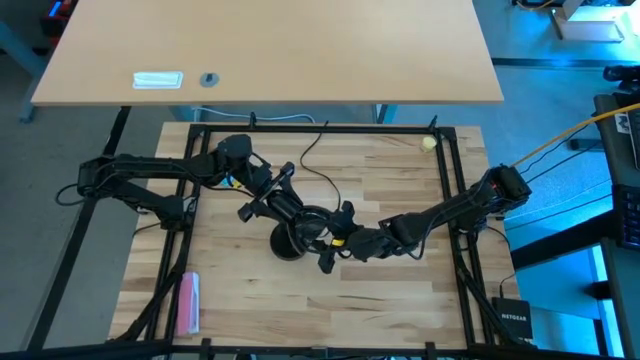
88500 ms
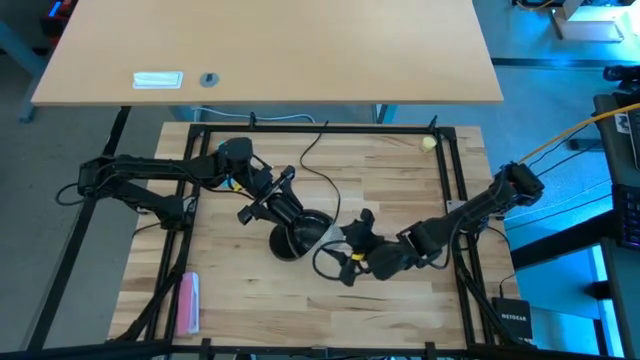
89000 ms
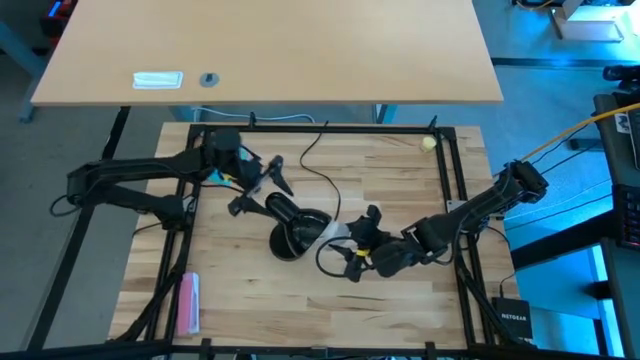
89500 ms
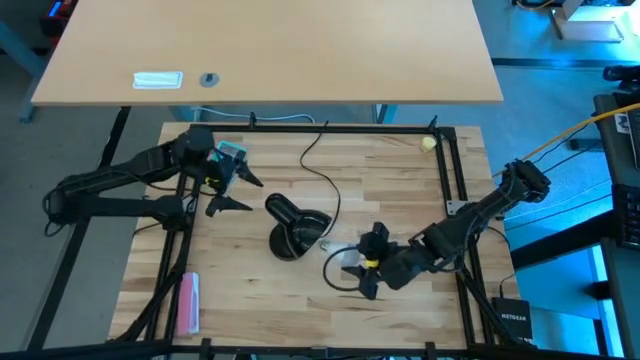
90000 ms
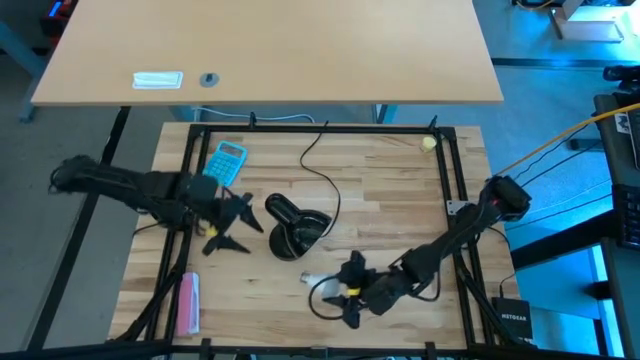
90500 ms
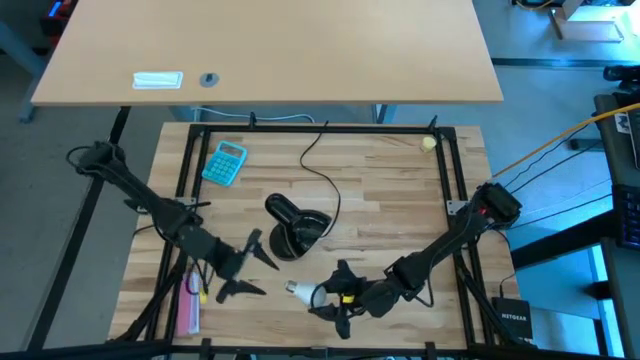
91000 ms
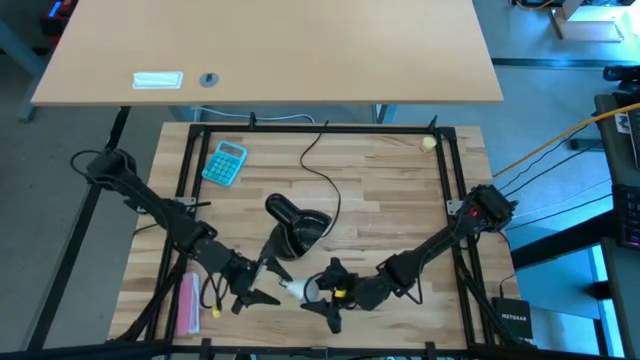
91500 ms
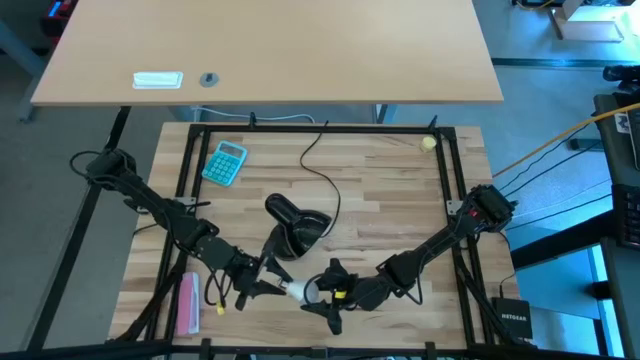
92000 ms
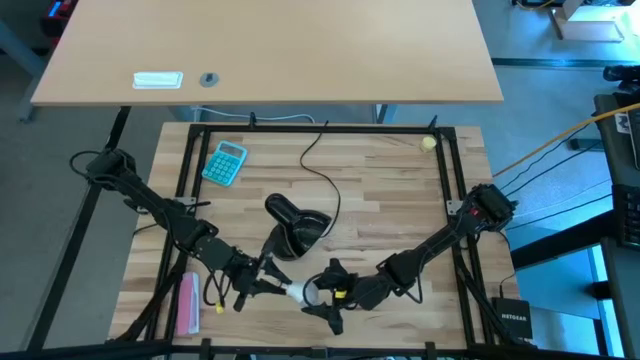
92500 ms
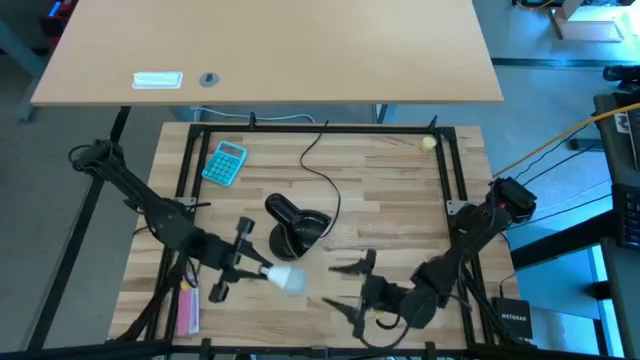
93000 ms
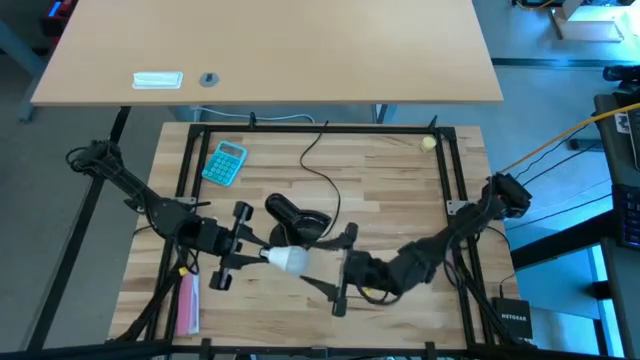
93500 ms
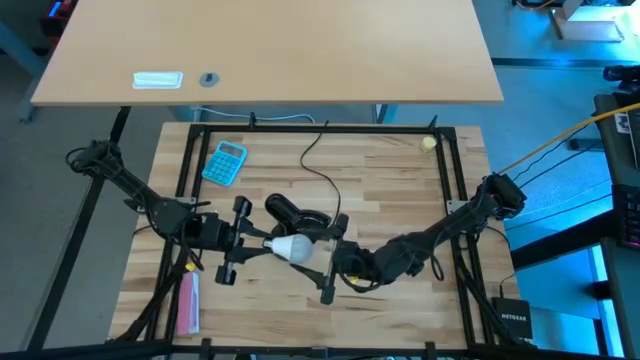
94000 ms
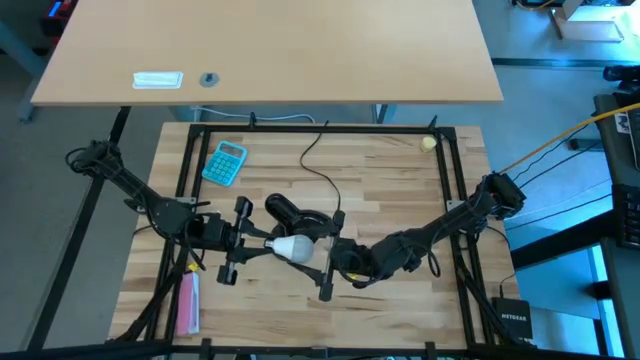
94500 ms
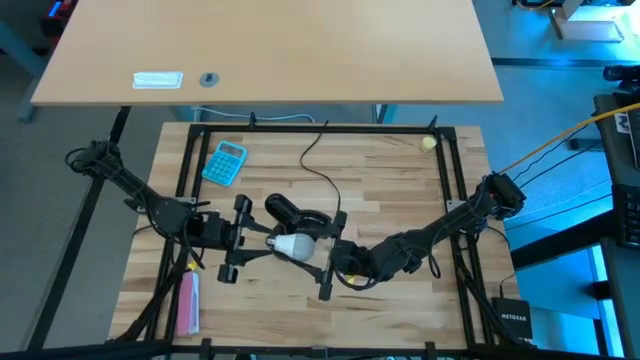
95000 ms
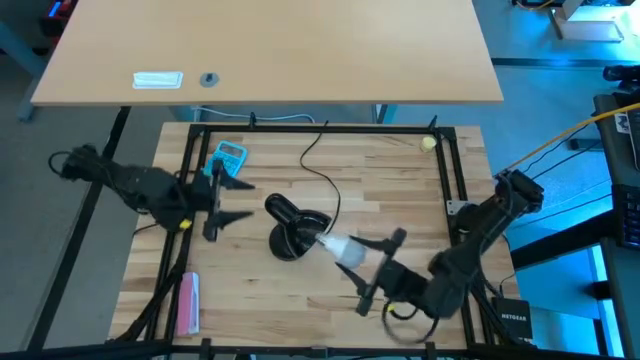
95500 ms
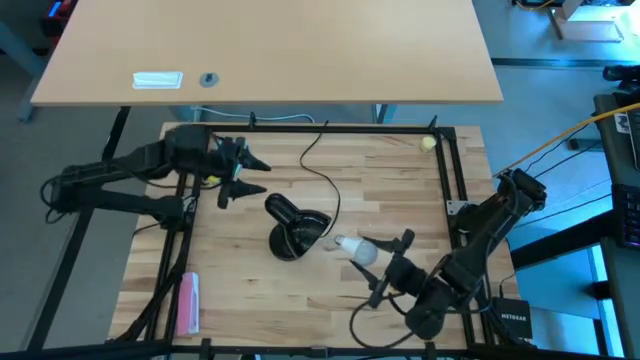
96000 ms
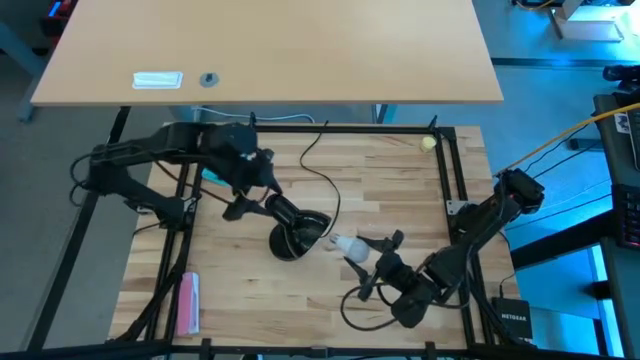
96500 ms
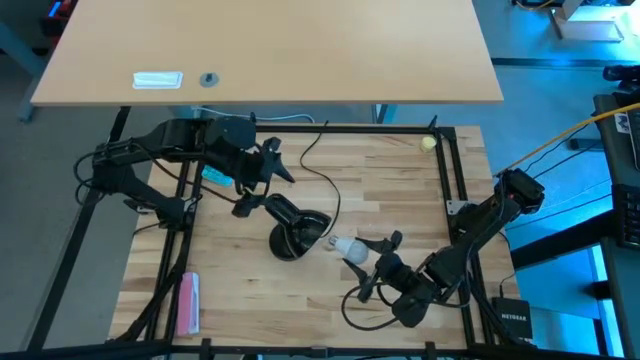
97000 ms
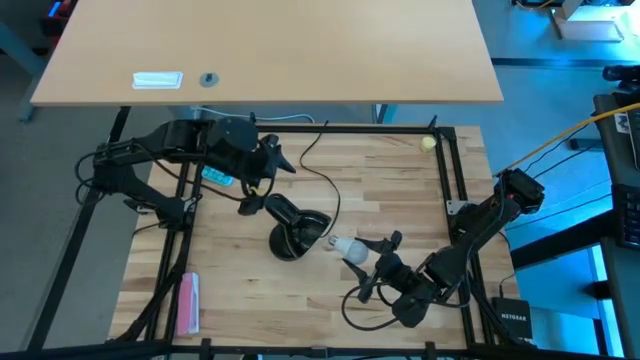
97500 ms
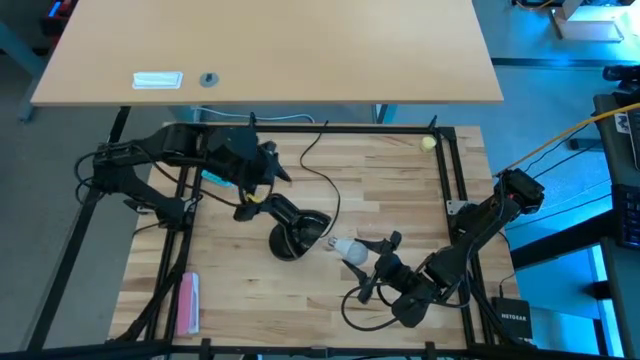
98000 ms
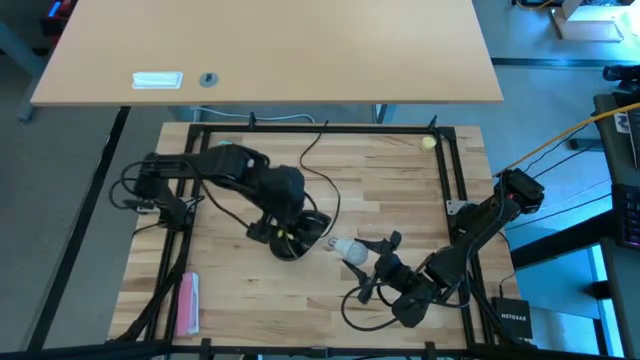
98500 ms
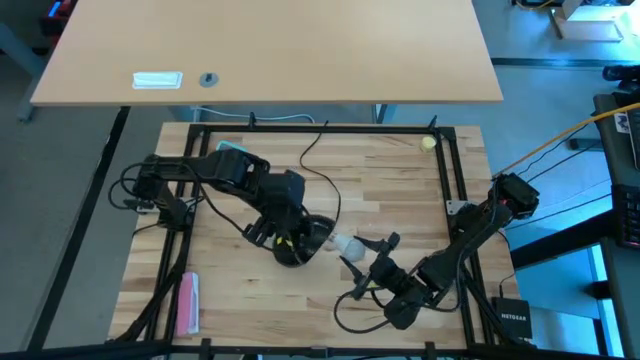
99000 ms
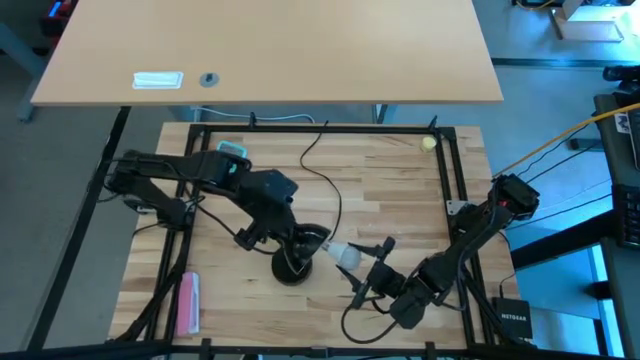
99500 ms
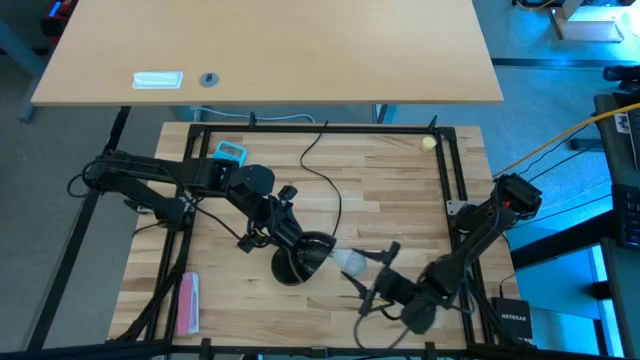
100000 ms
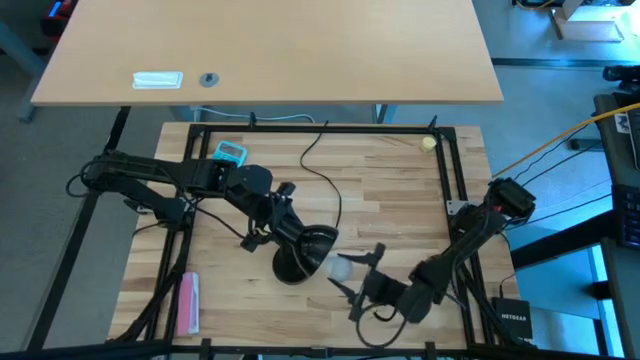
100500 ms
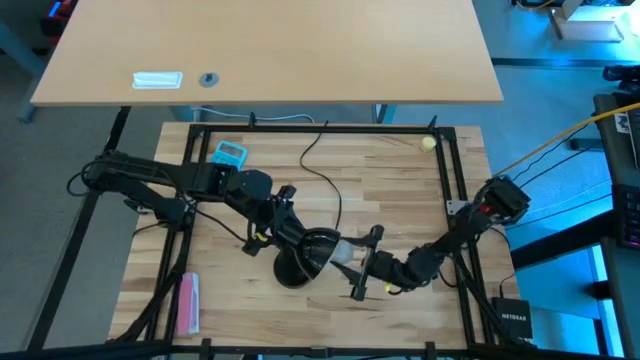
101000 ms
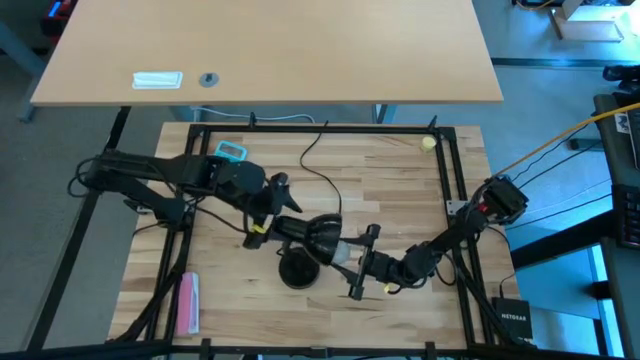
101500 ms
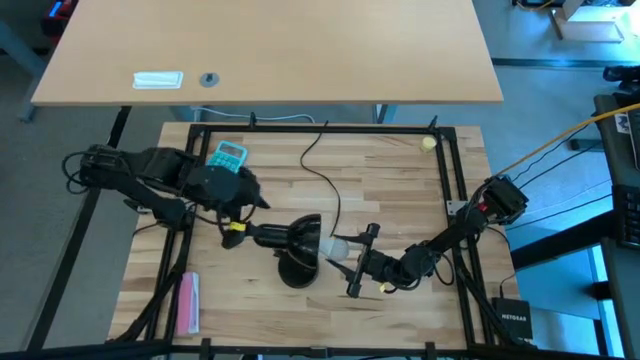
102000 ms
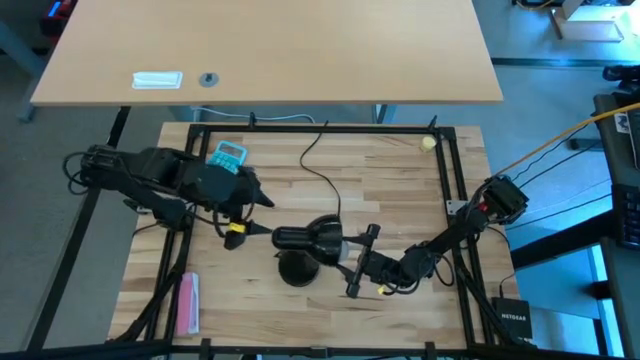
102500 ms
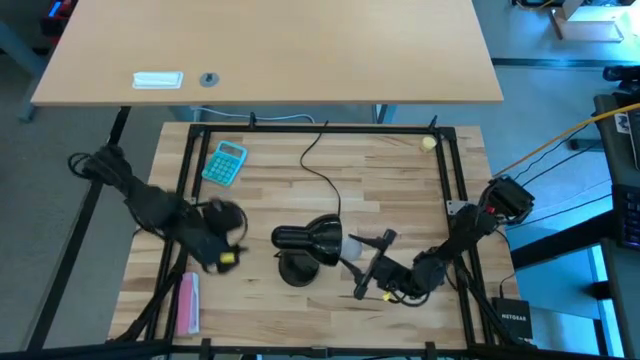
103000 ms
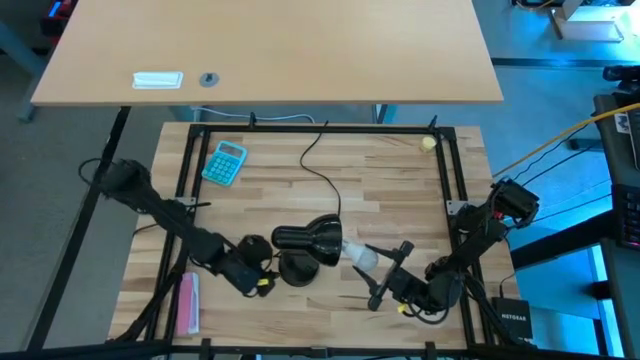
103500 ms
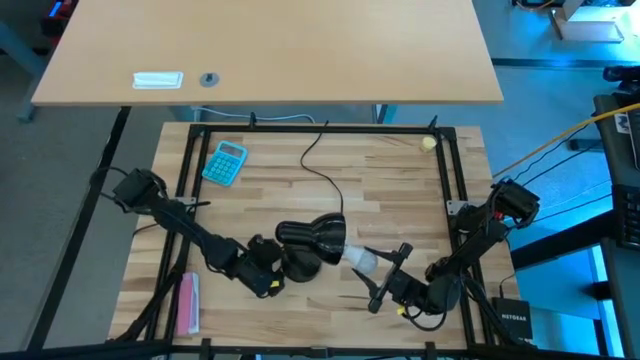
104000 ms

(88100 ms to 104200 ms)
Task: Screw lightbulb
Insert the lightbulb into the black lamp

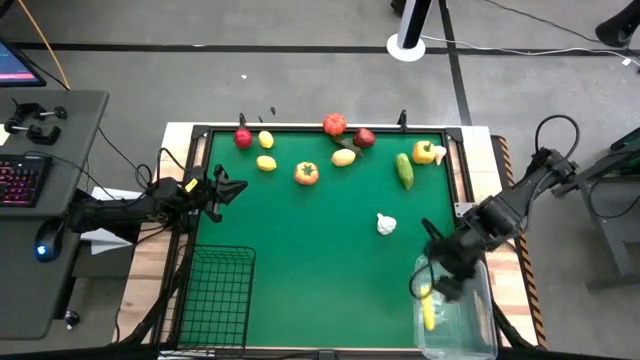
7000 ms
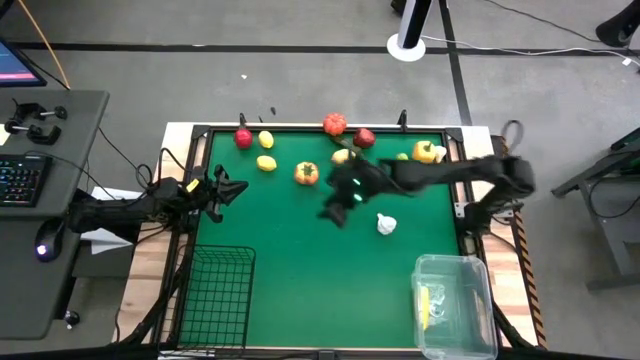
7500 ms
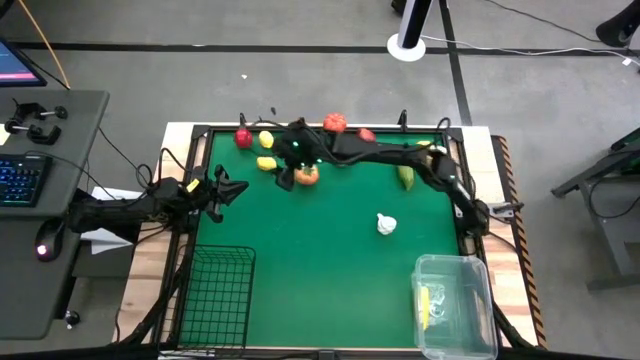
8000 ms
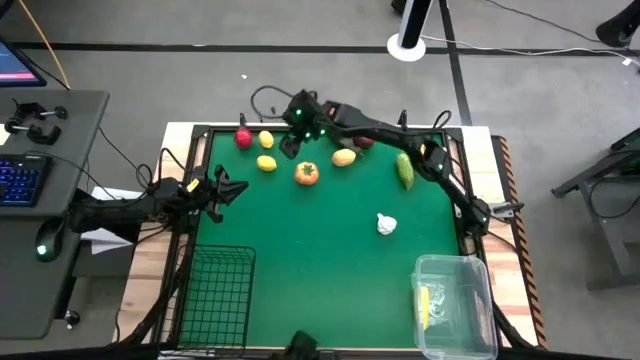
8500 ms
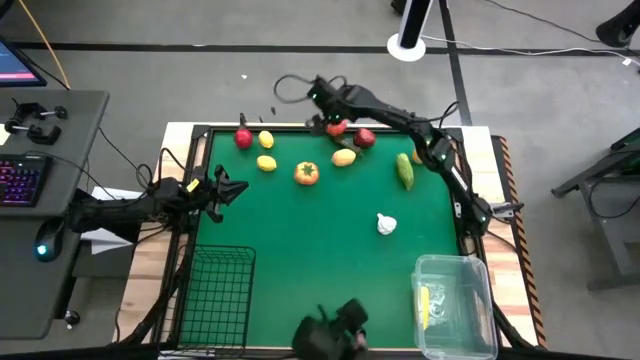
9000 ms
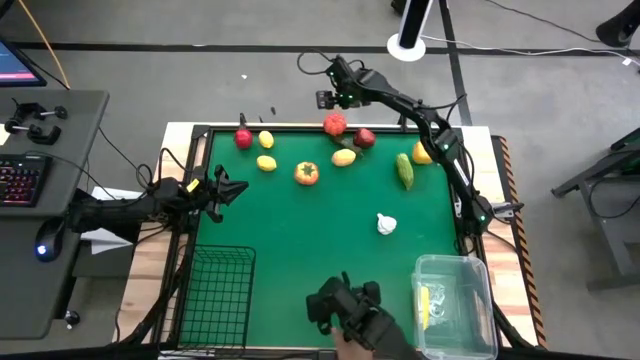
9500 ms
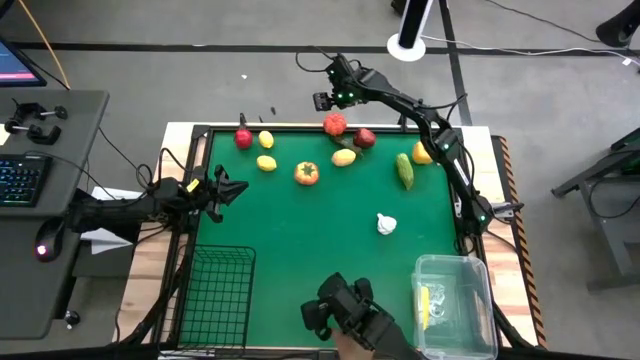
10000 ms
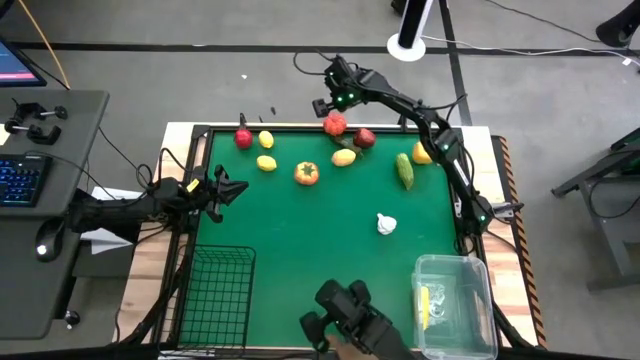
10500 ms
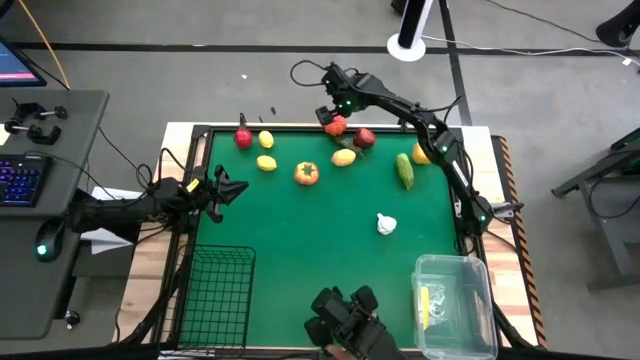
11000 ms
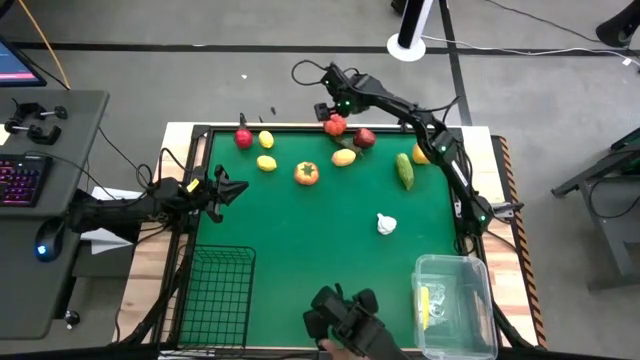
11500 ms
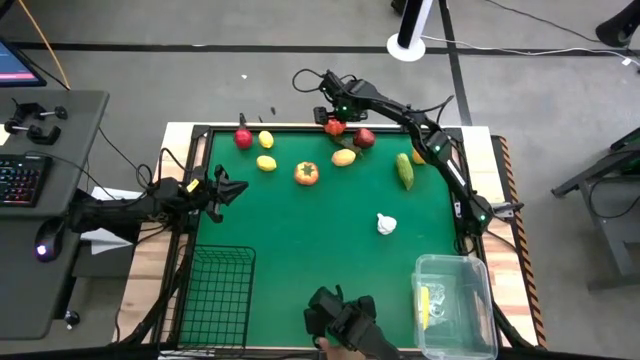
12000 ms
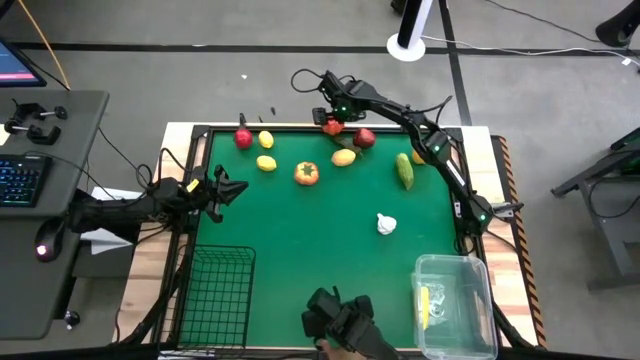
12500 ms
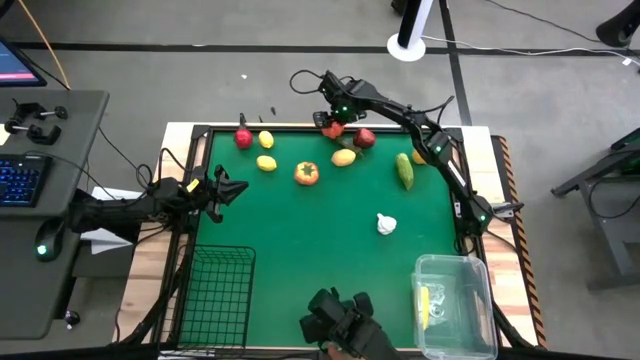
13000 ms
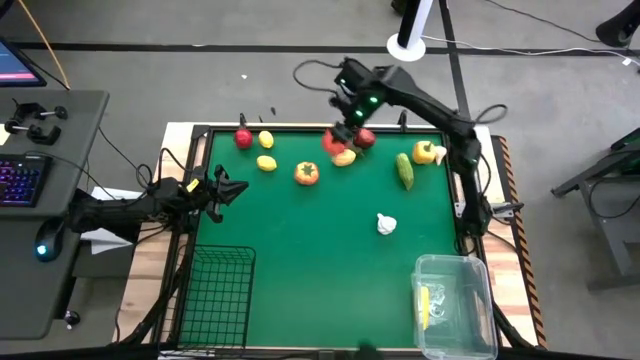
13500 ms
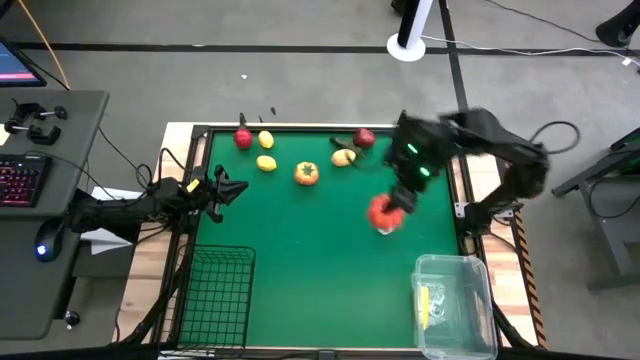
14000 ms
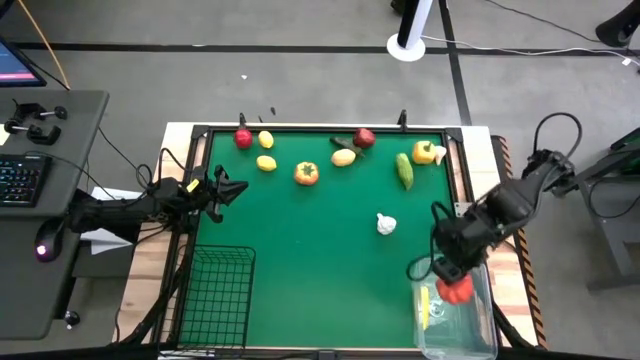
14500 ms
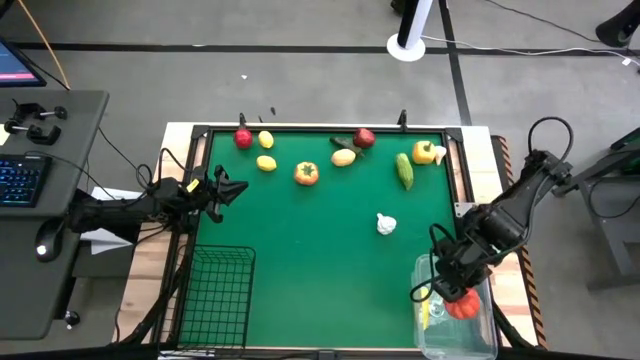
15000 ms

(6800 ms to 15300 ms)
Task: Sort produce into baskets
Put the orange bell pepper into the transparent bin
